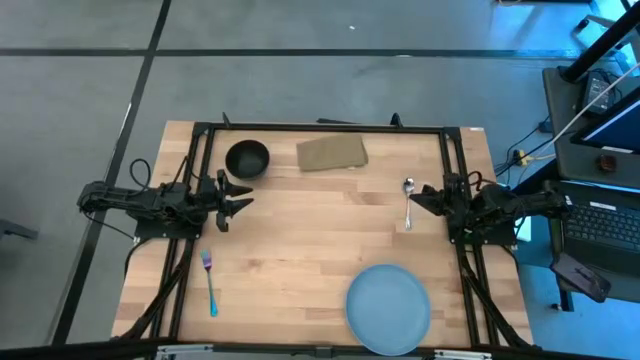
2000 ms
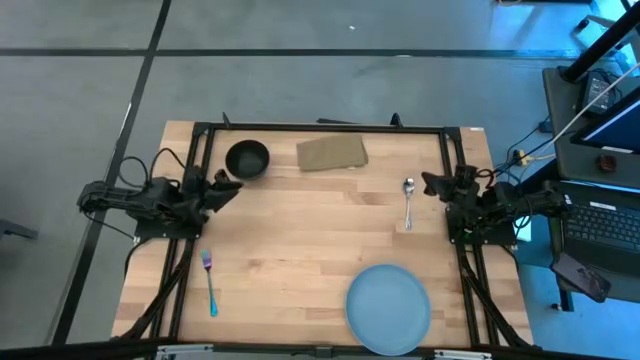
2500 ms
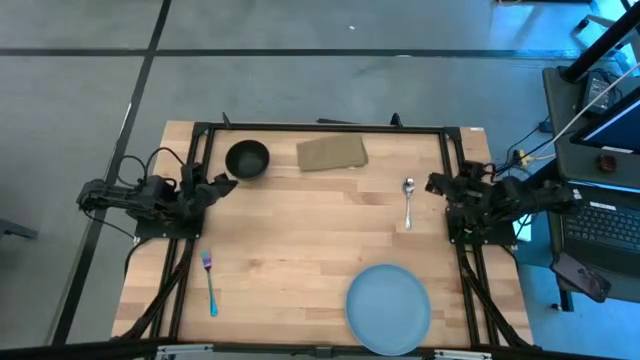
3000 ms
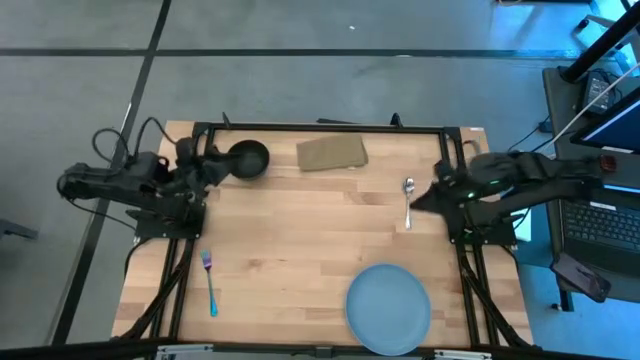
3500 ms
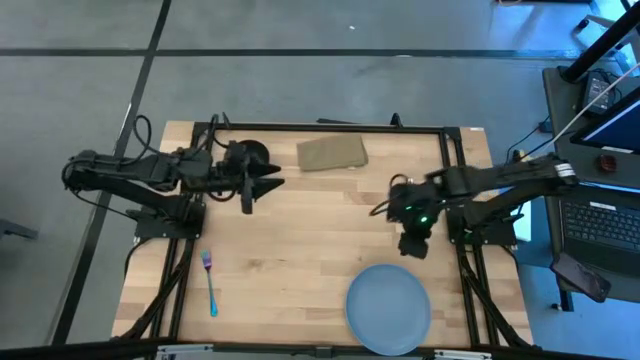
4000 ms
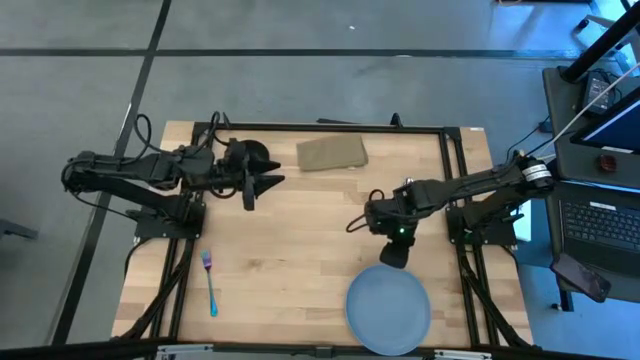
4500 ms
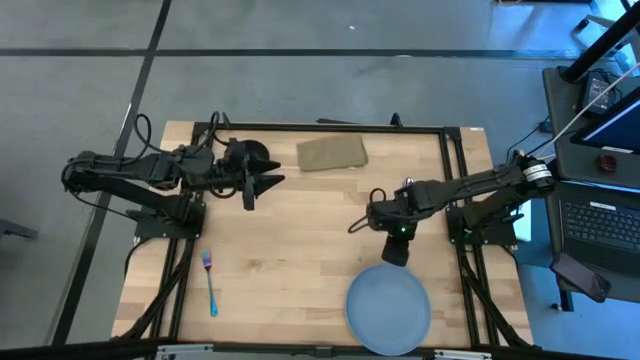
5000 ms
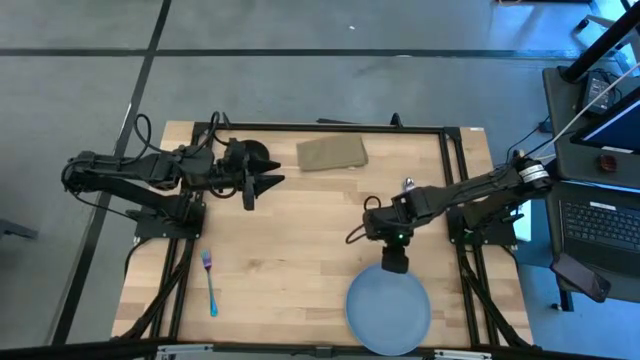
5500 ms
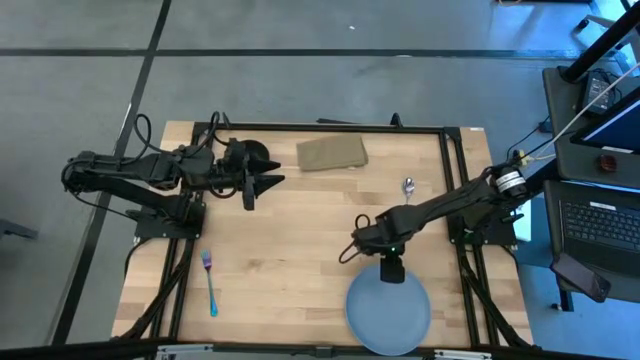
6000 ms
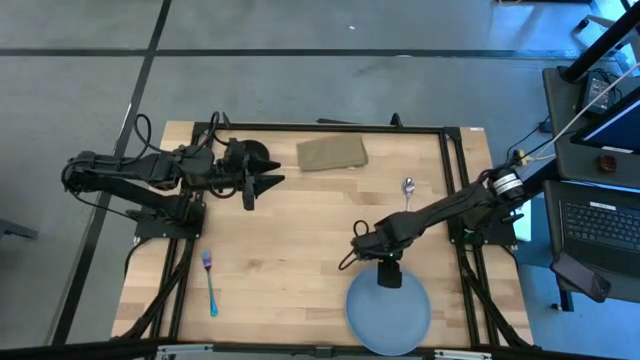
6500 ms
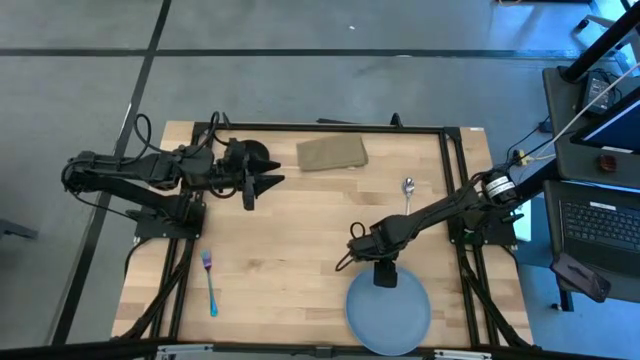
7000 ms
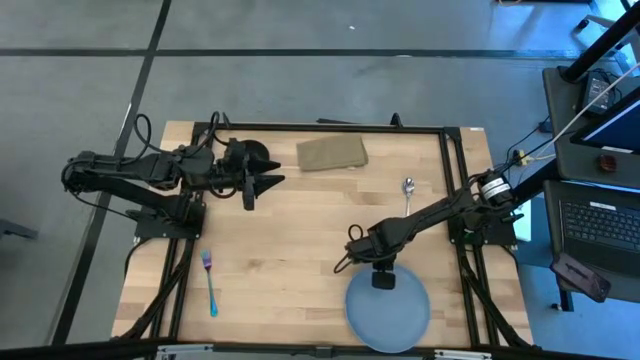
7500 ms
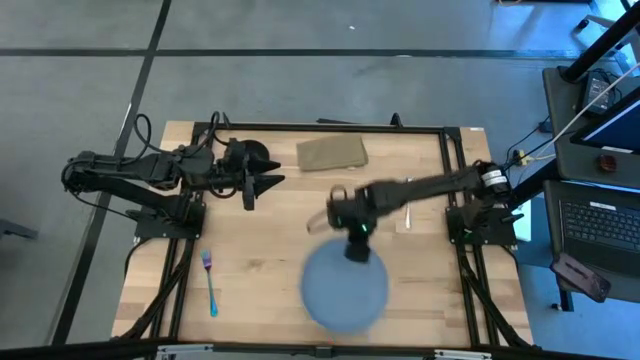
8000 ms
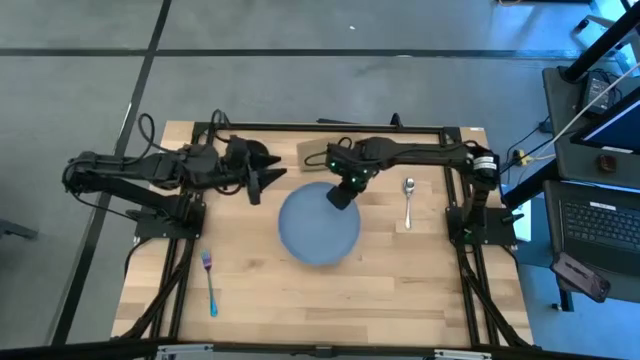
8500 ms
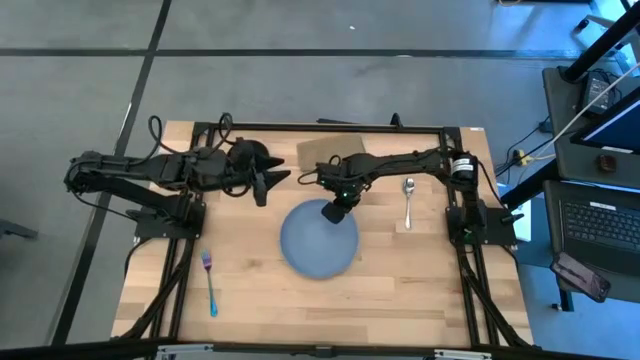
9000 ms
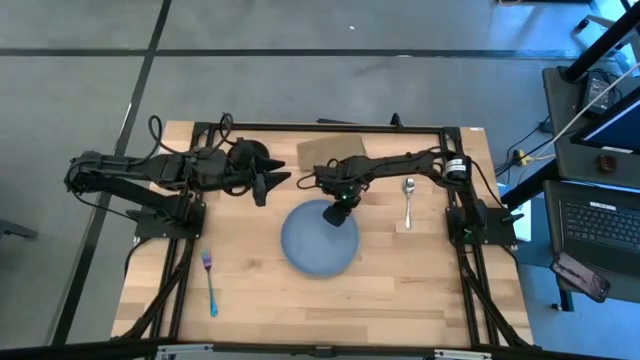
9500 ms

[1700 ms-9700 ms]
Task: Set table place
Move the blue plate to the center of the table

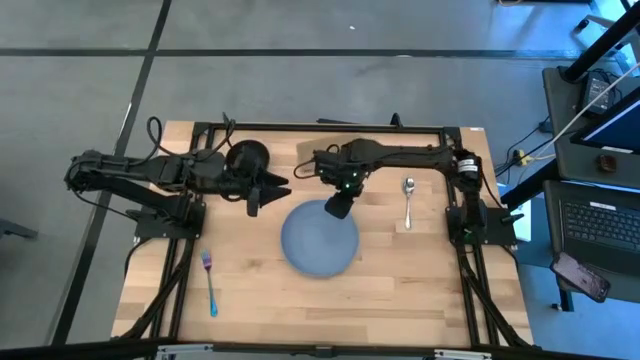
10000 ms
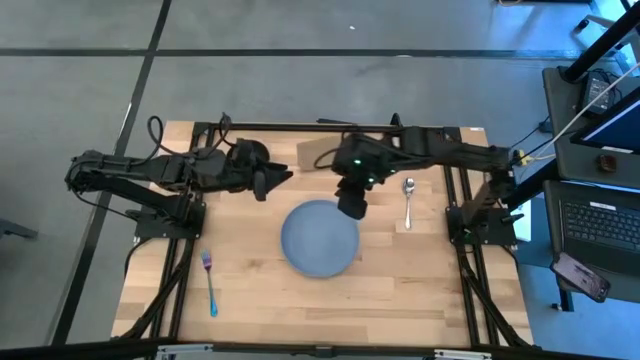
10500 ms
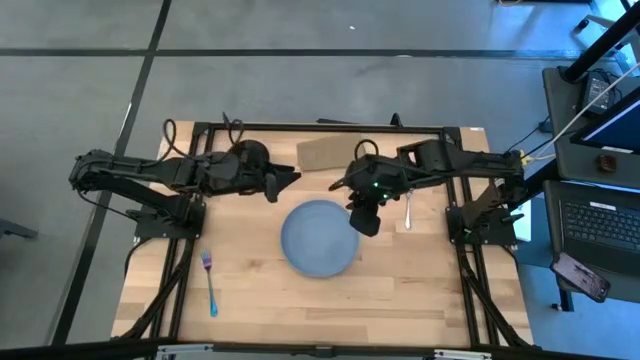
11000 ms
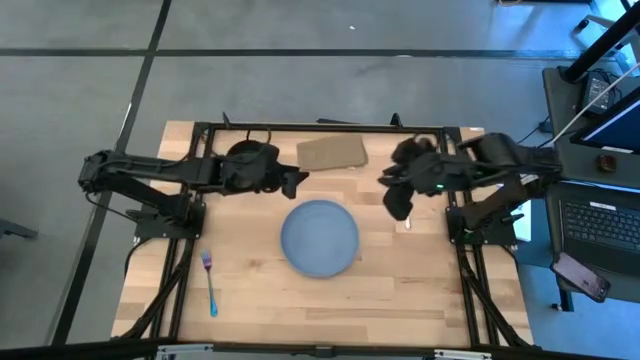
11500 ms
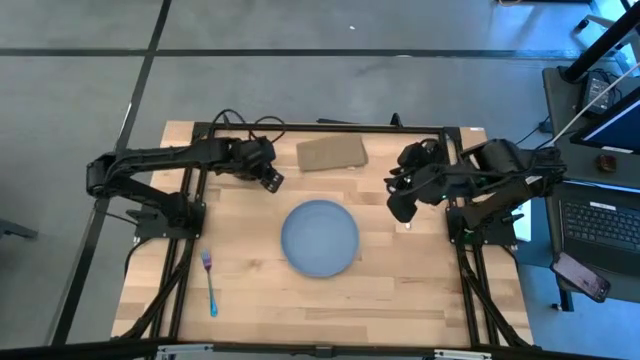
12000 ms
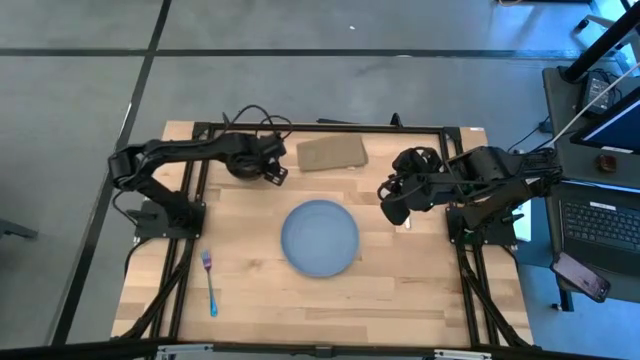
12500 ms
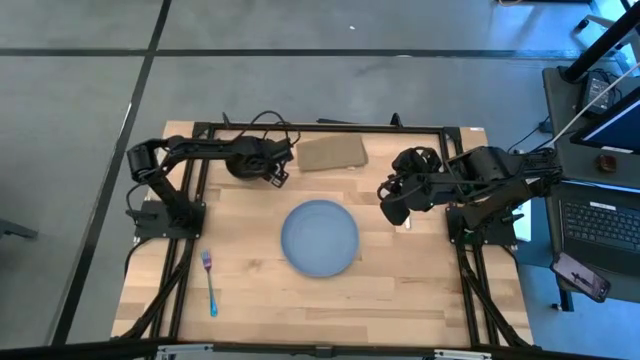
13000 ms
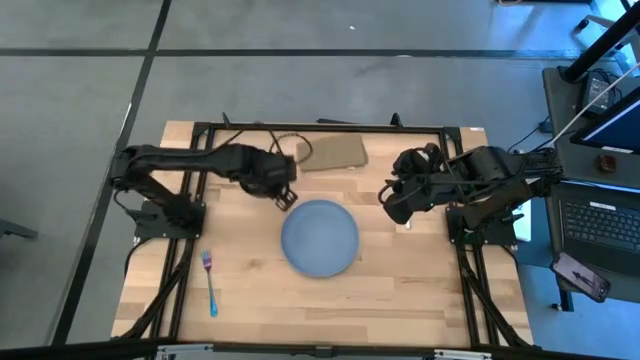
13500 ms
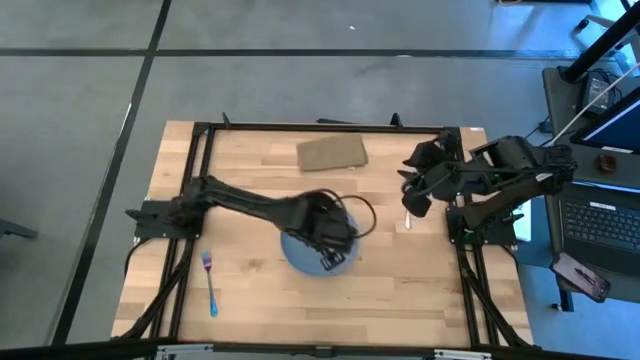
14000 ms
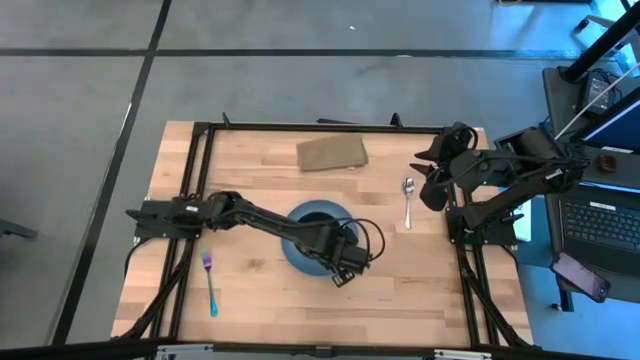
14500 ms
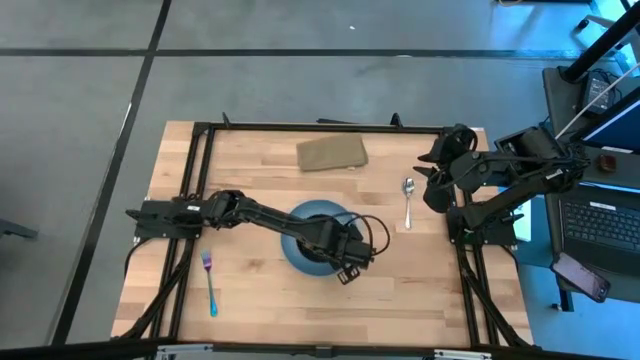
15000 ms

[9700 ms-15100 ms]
Put the black bowl on top of the blue plate

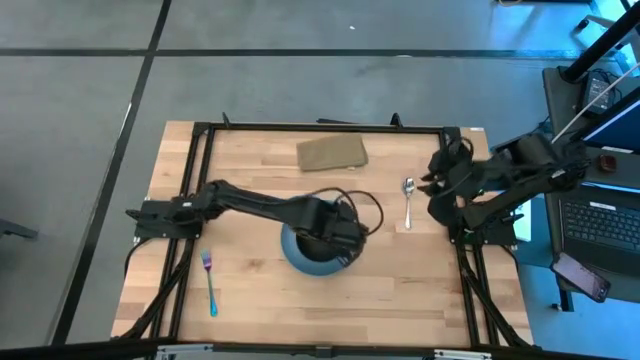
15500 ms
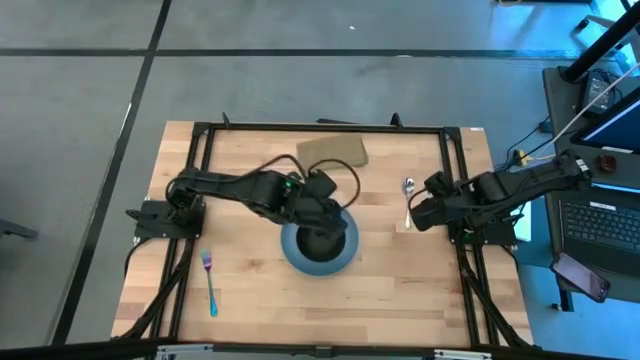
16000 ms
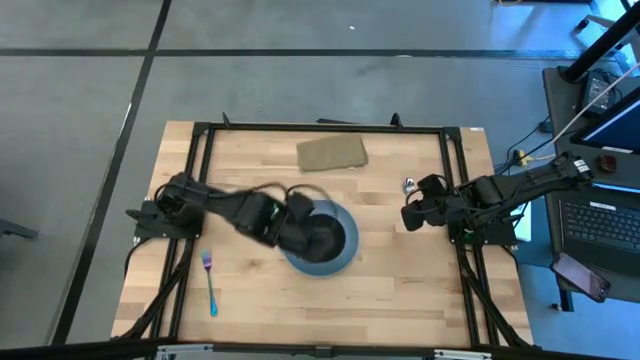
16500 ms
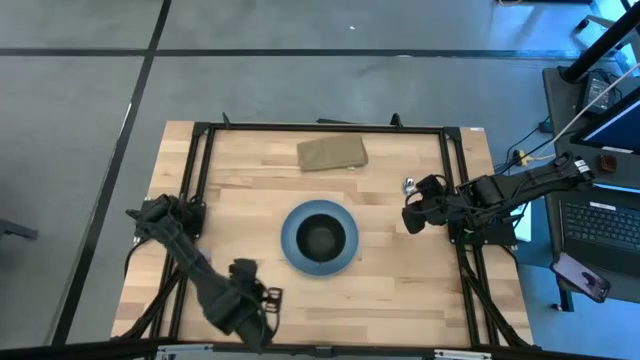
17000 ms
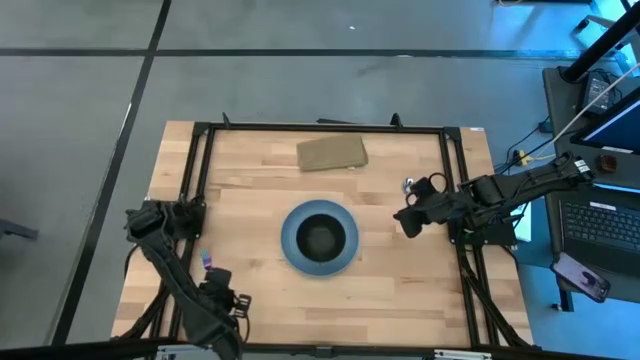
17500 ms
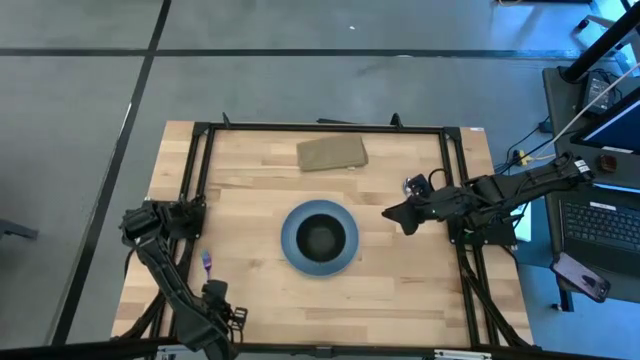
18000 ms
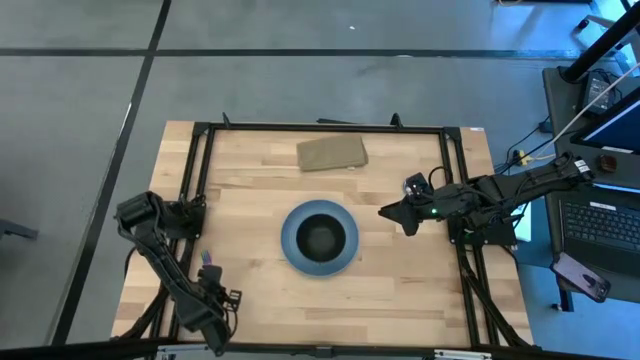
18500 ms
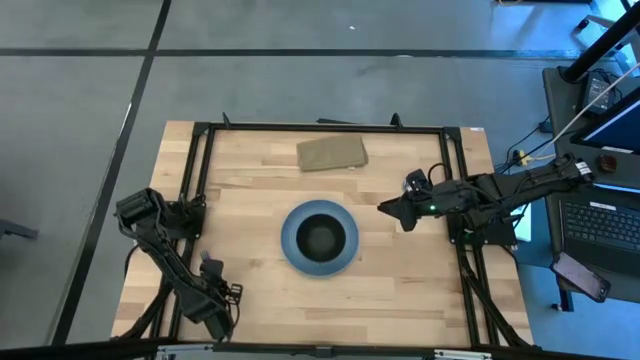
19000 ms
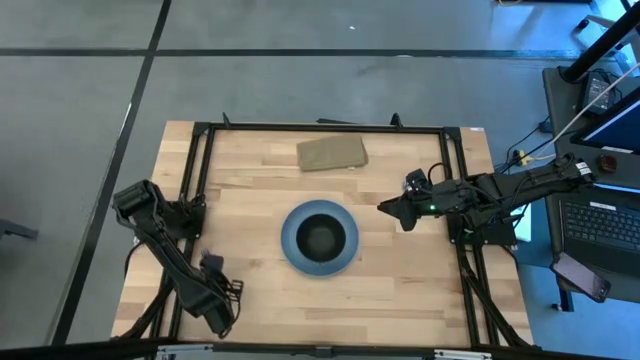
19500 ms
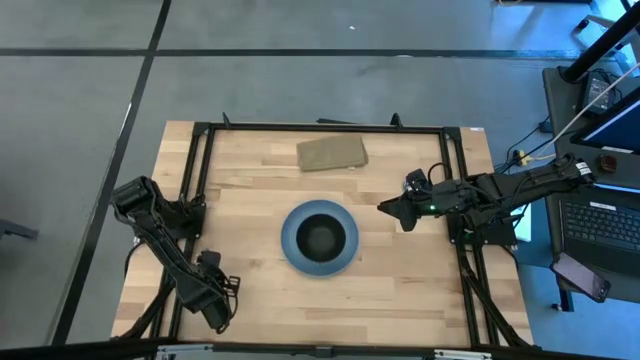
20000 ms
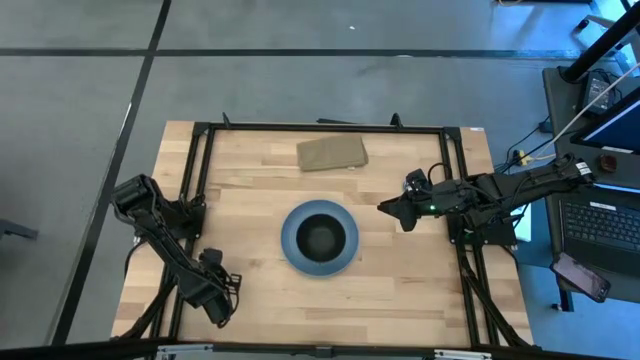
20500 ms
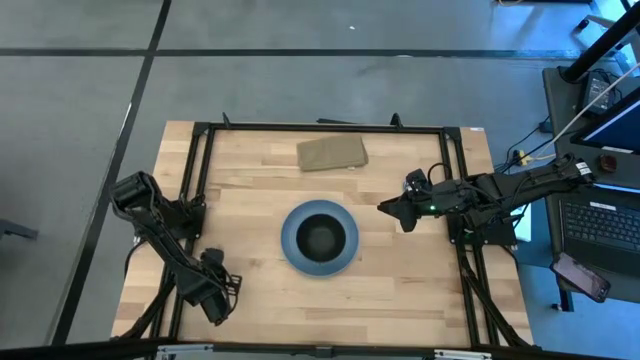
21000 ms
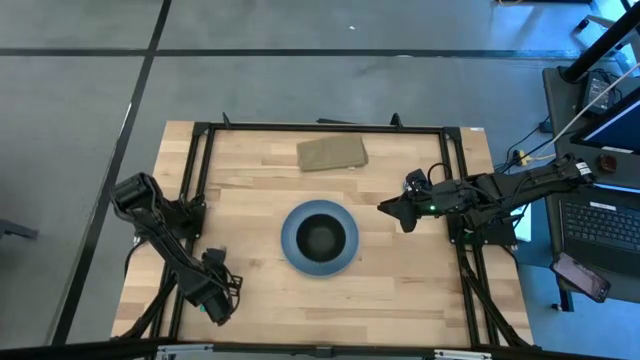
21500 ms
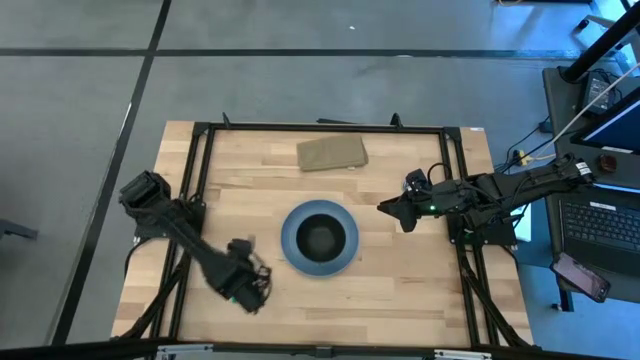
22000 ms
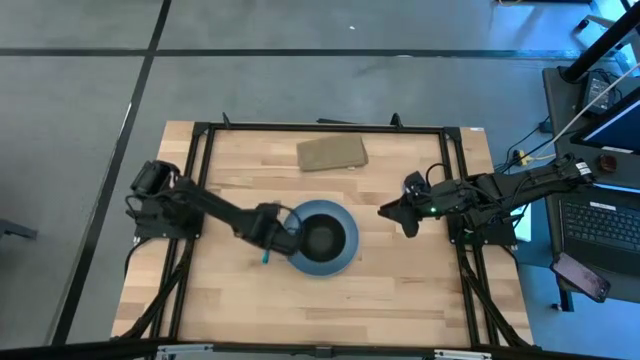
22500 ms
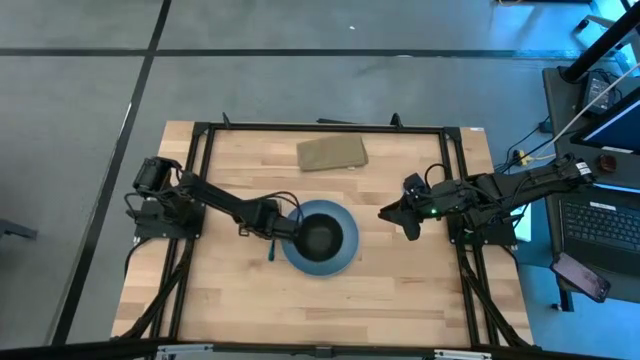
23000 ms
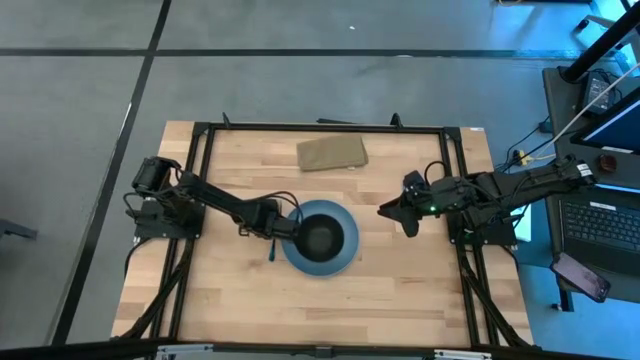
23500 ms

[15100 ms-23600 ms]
Move the blue fork to the left of the blue plate
